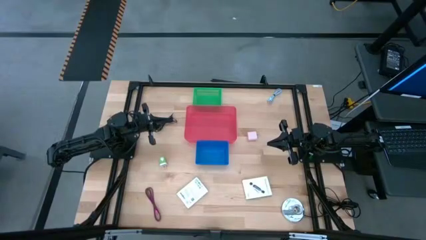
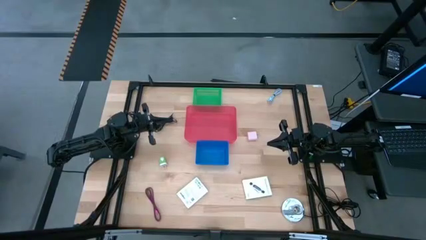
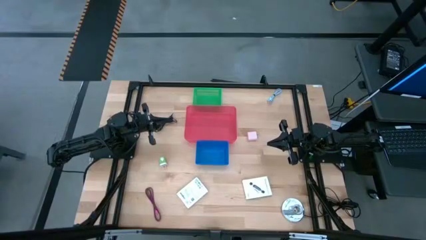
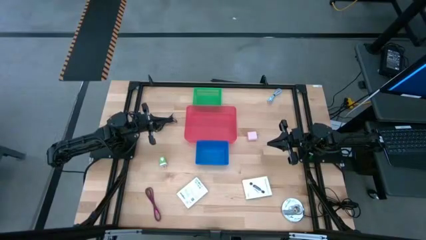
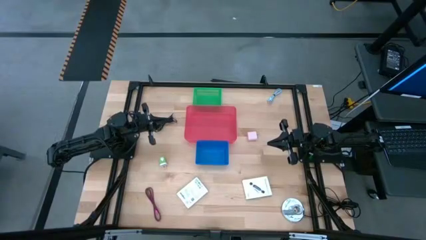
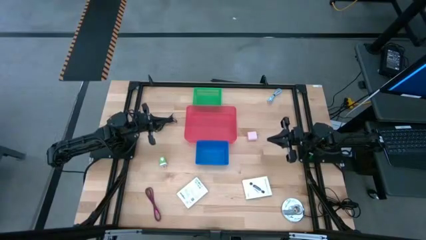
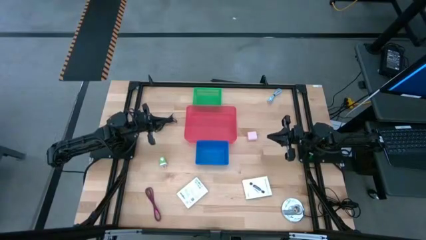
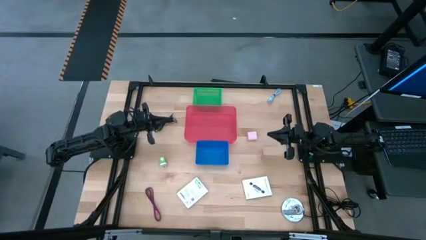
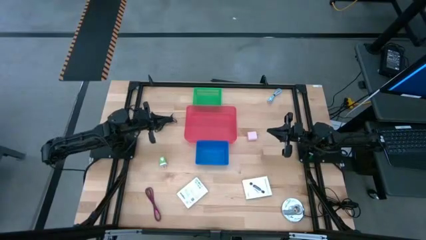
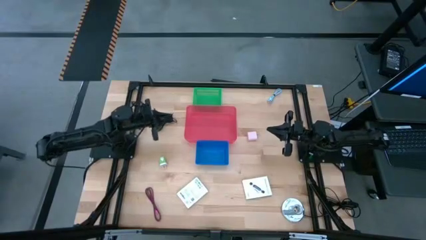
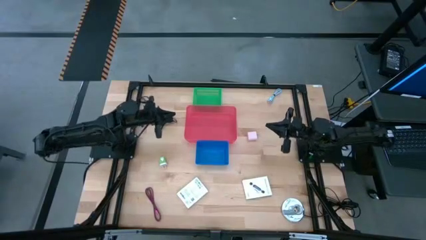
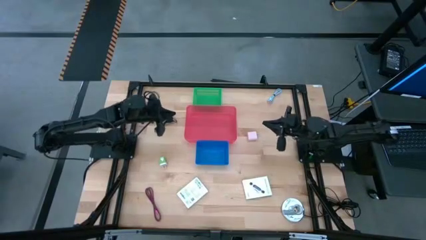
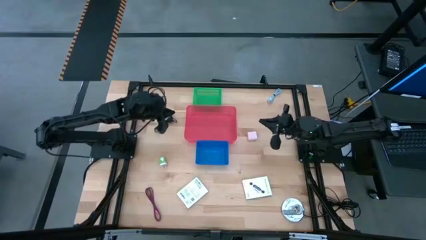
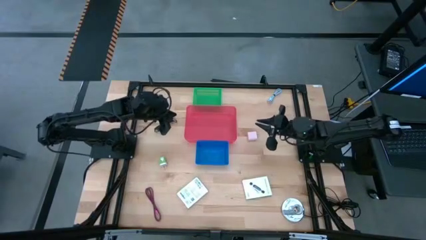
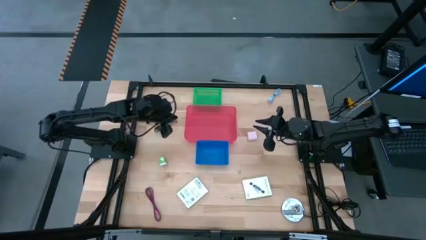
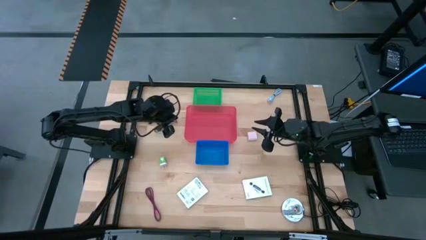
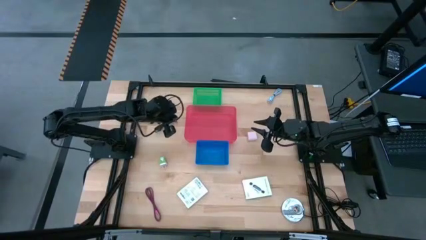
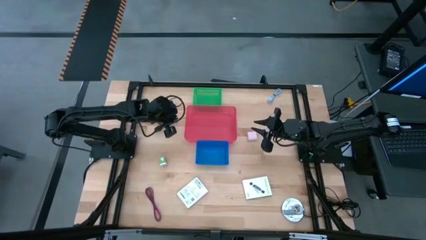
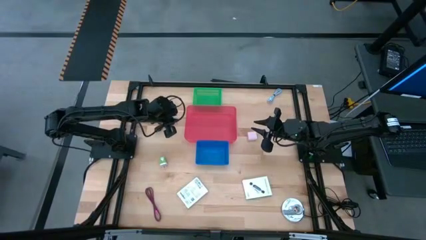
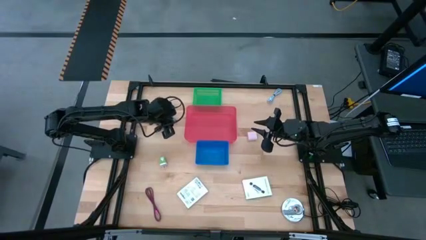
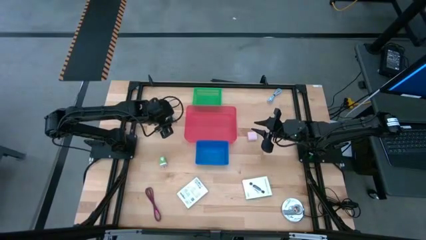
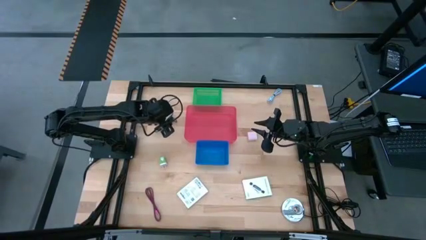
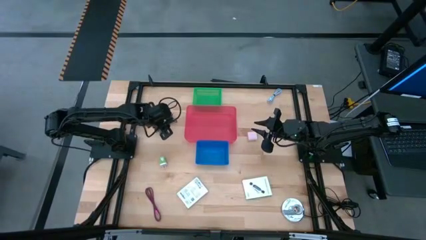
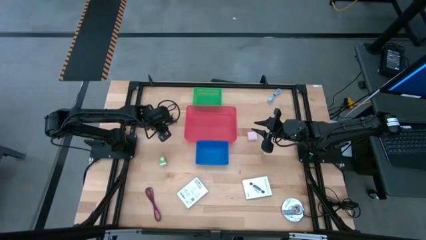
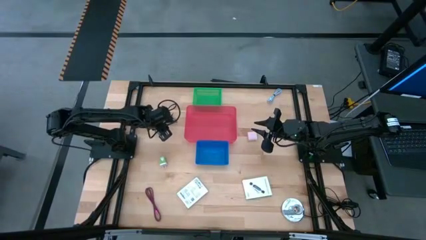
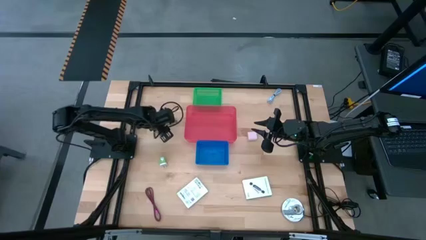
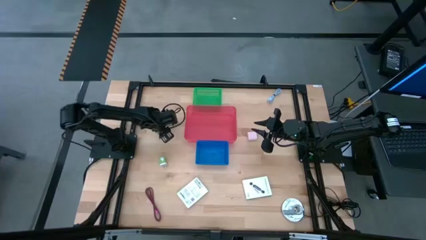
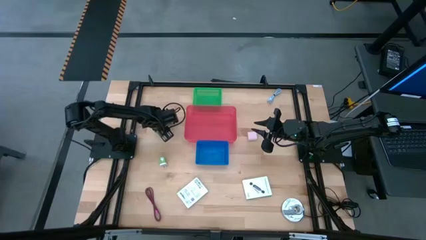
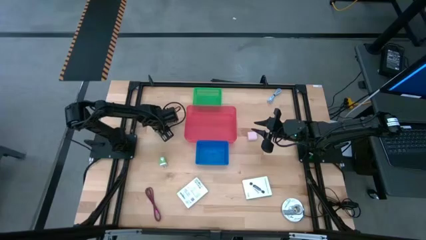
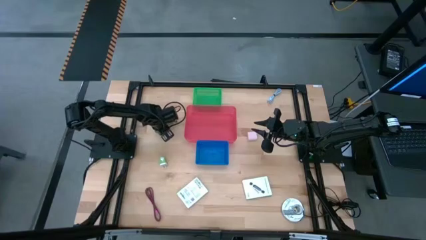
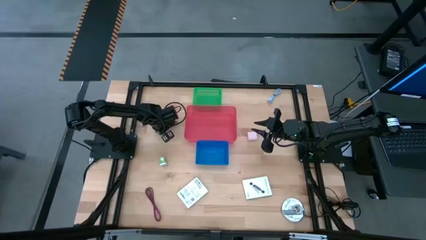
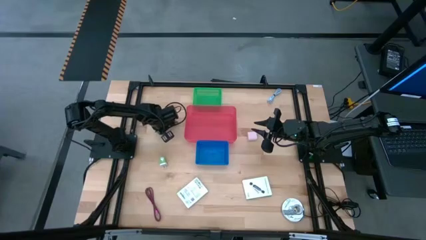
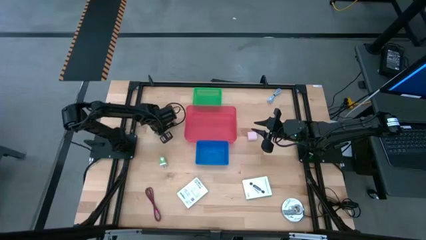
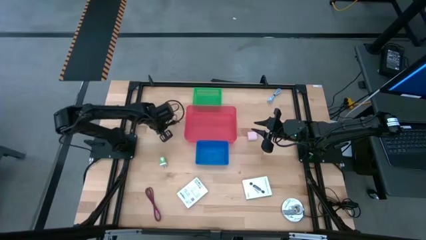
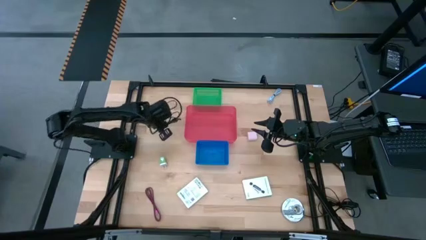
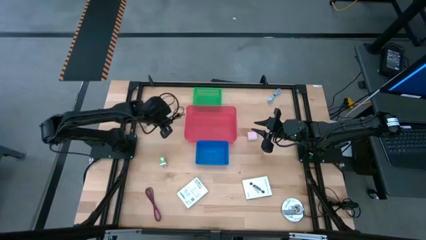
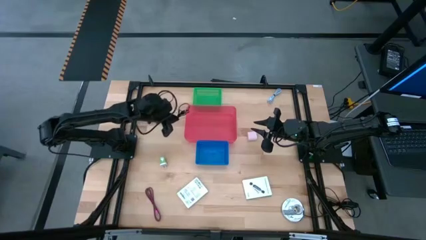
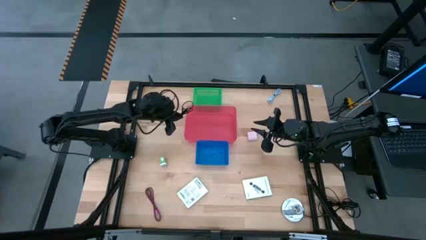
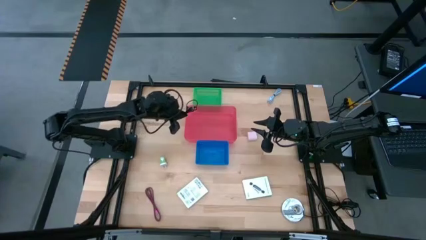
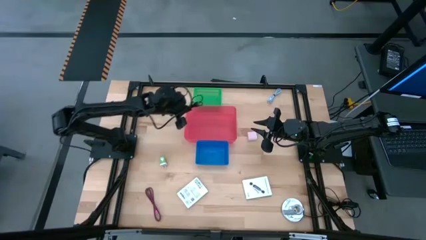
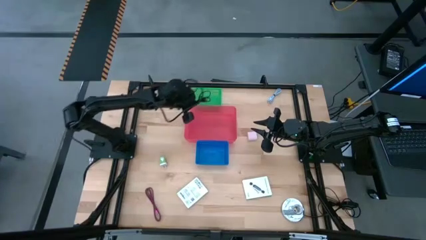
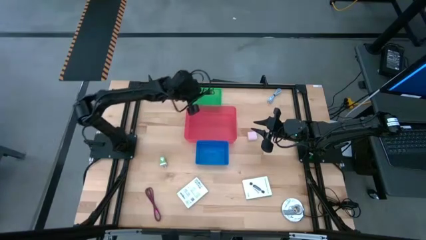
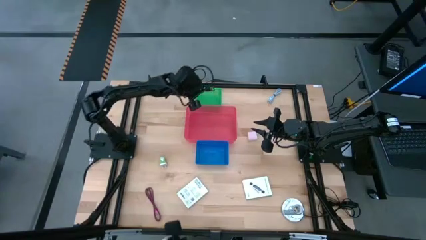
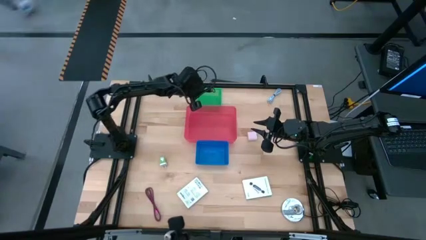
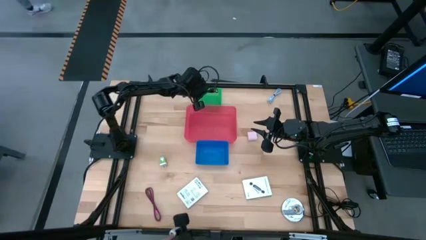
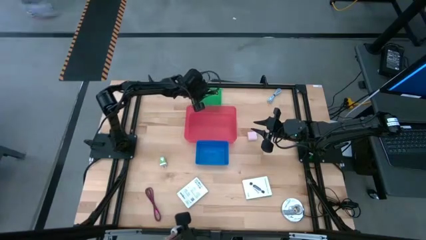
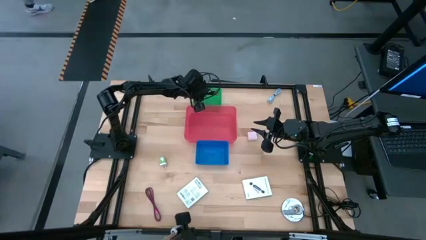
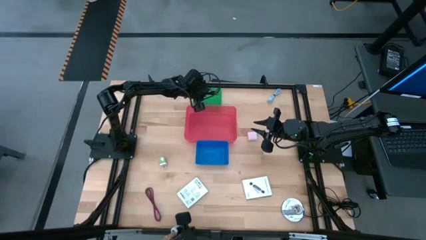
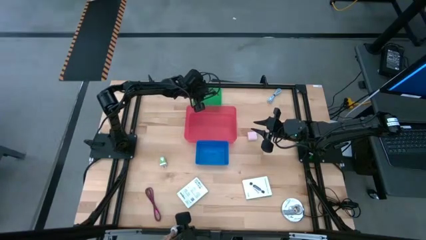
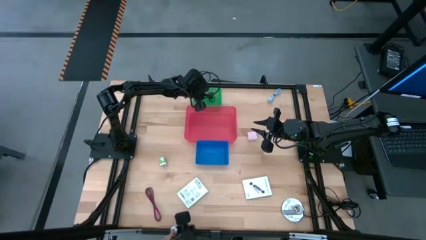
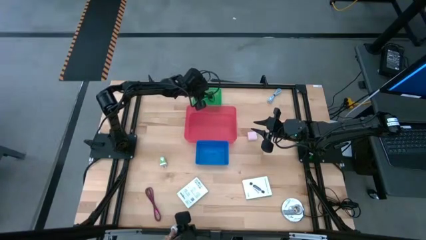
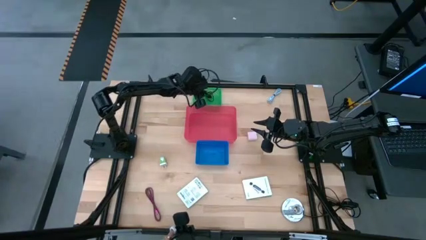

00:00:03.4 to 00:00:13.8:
Task: Pick and place items into bin
Put the black charger cable into the green bin

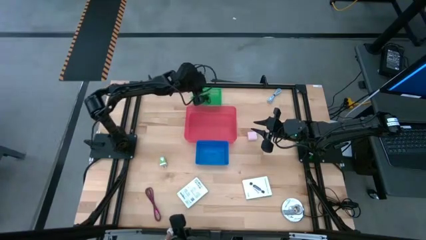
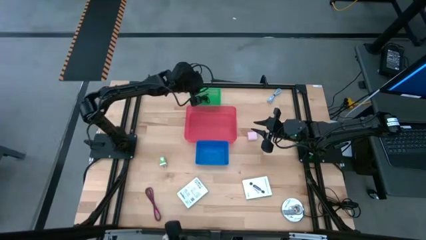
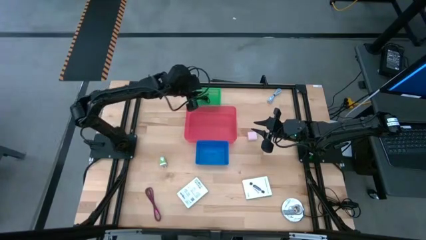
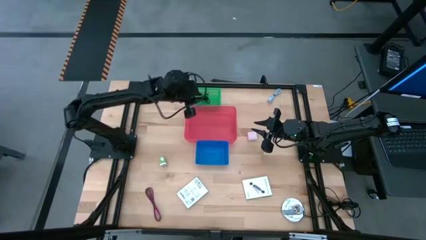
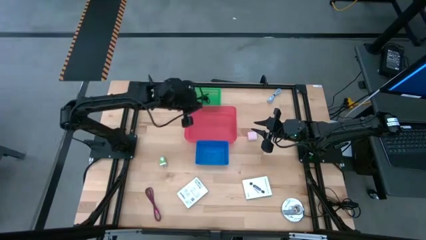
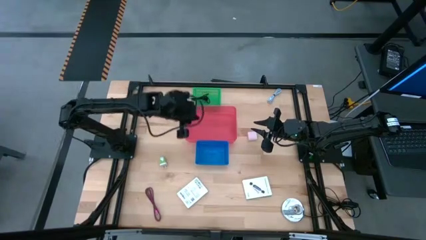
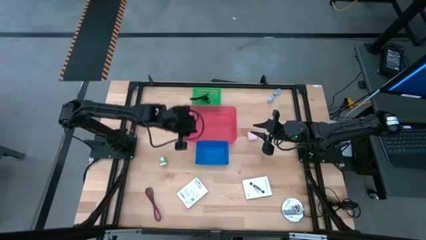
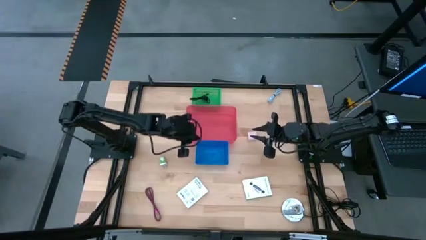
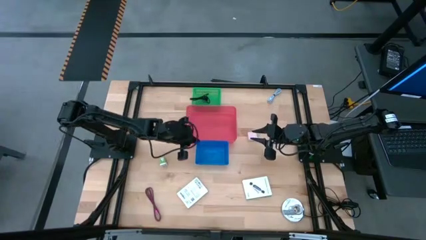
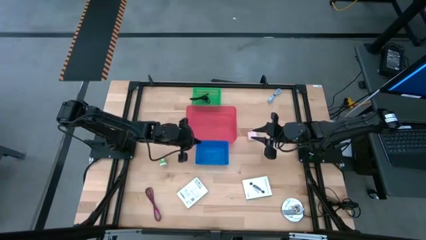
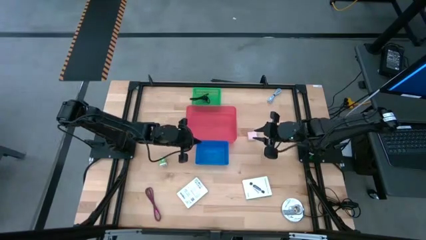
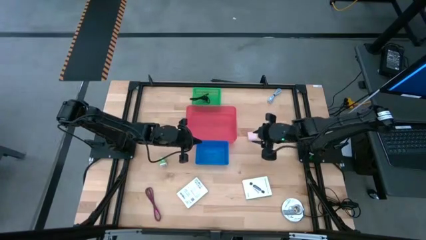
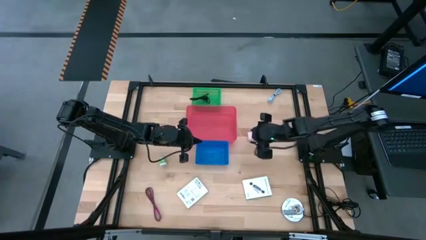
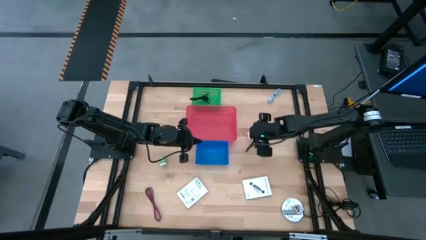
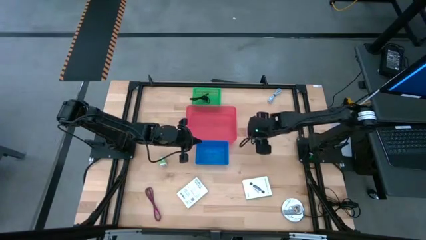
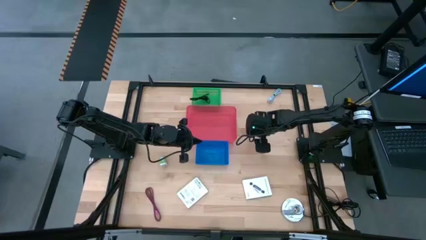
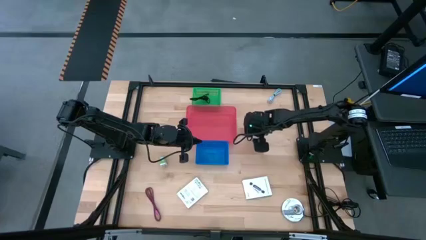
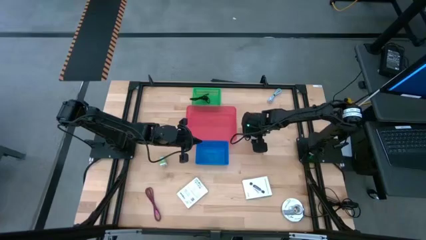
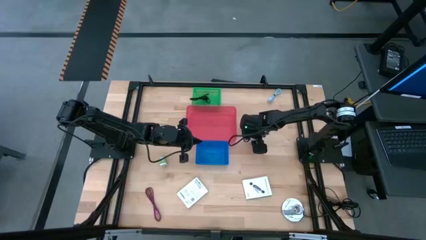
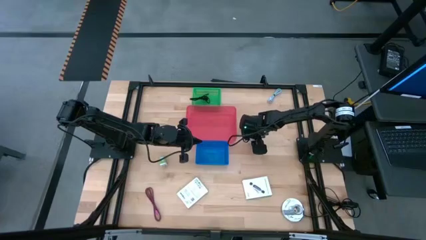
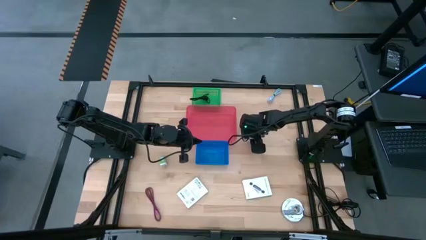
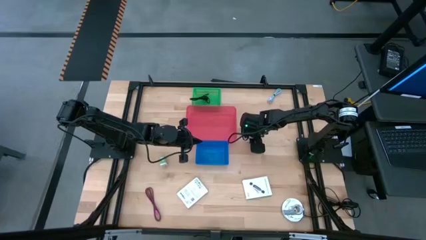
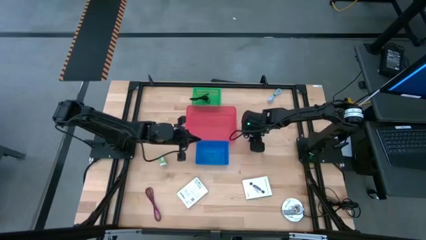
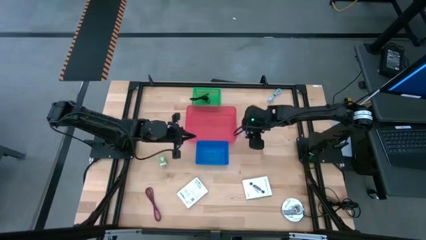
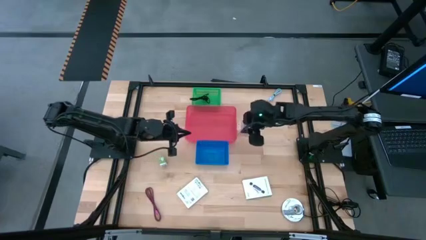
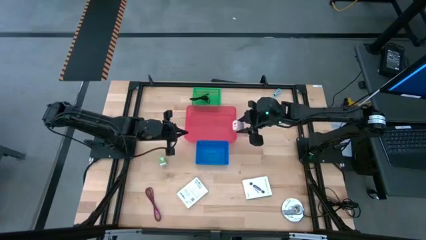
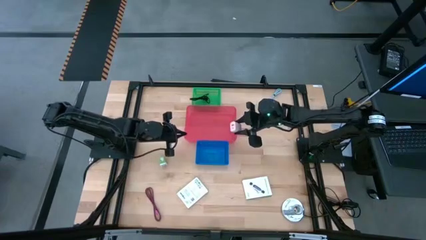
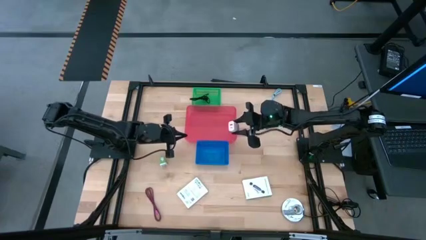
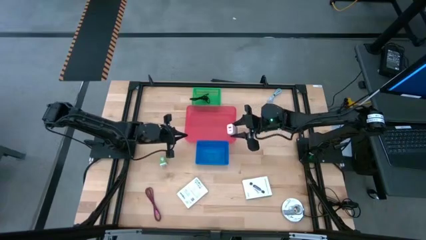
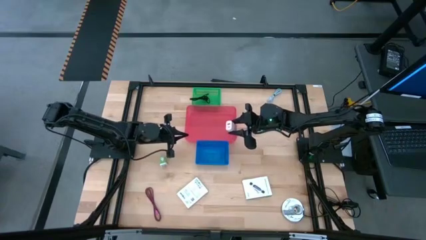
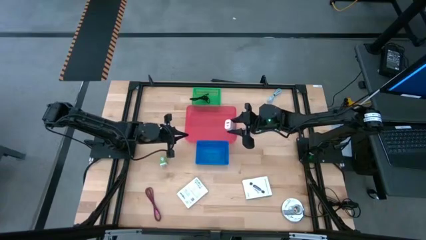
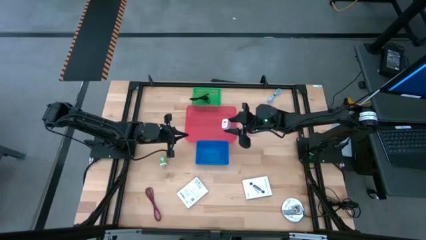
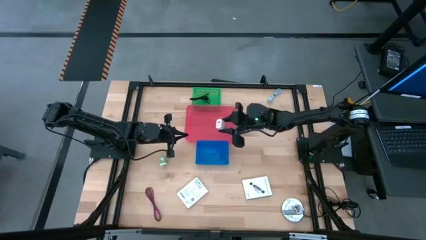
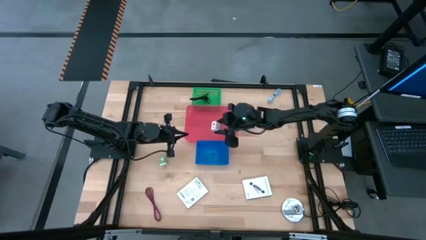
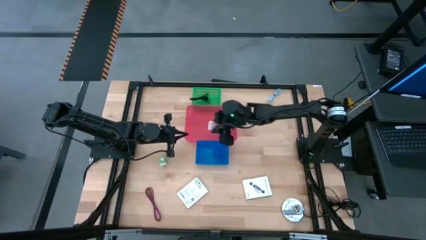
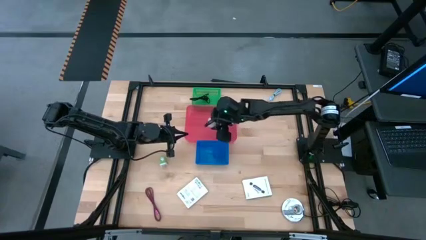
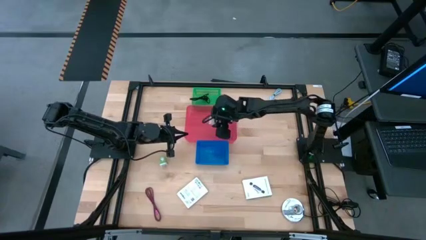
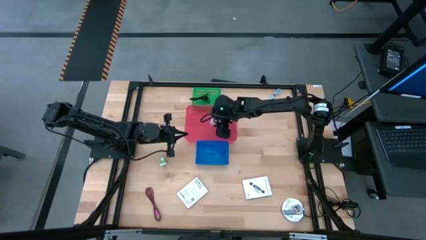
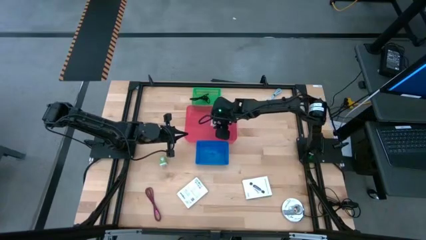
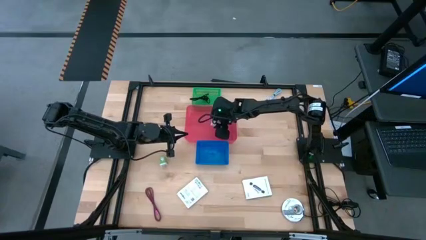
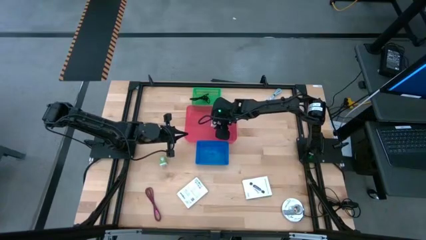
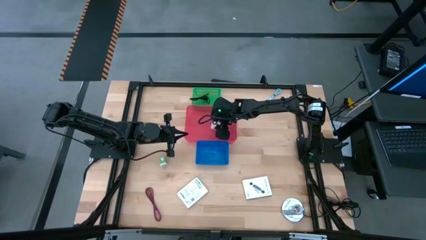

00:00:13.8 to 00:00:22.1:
Put the white charger adapter into the red bin
